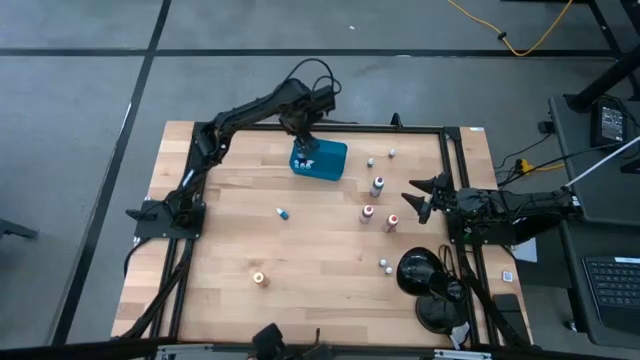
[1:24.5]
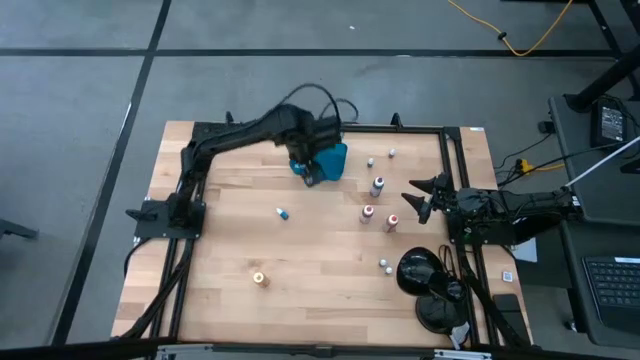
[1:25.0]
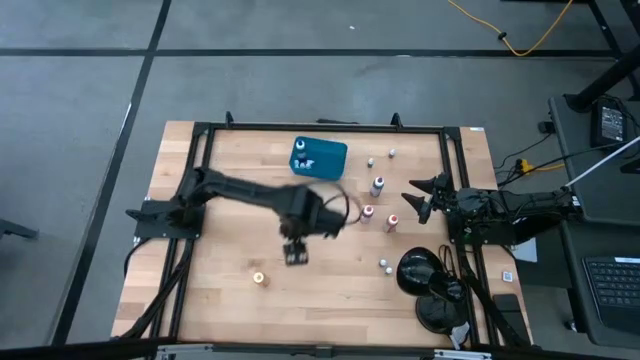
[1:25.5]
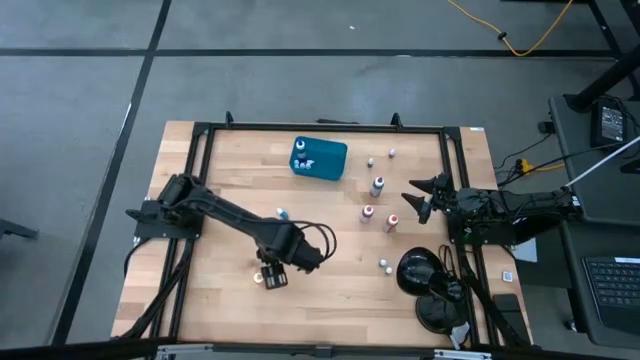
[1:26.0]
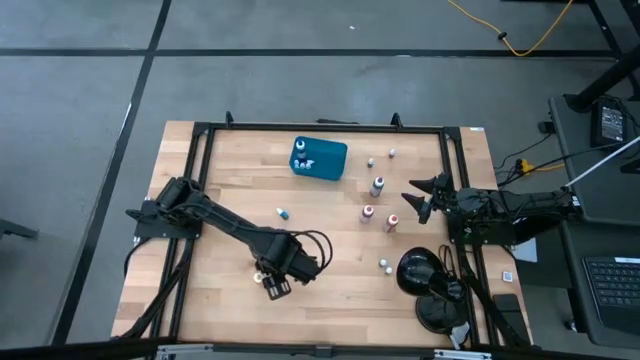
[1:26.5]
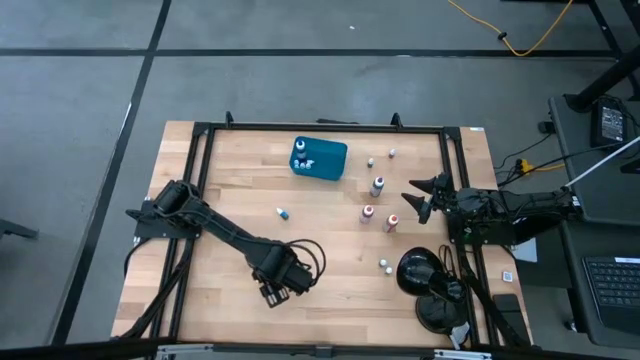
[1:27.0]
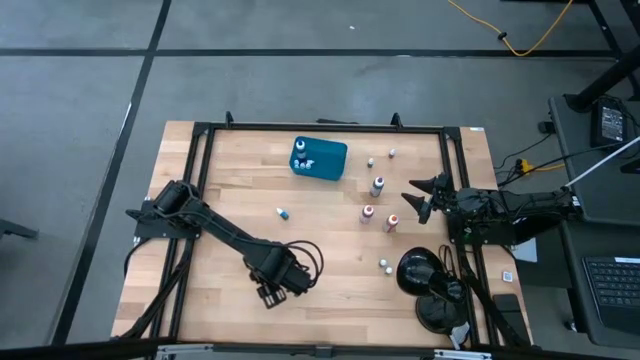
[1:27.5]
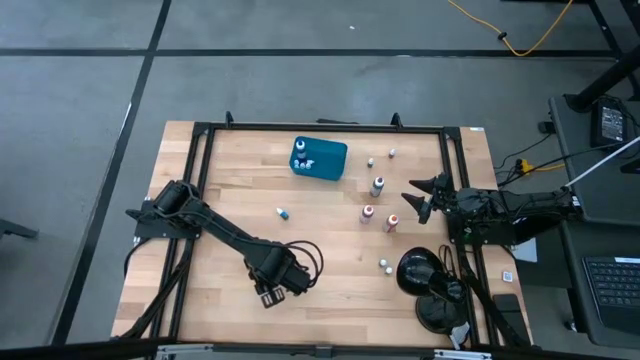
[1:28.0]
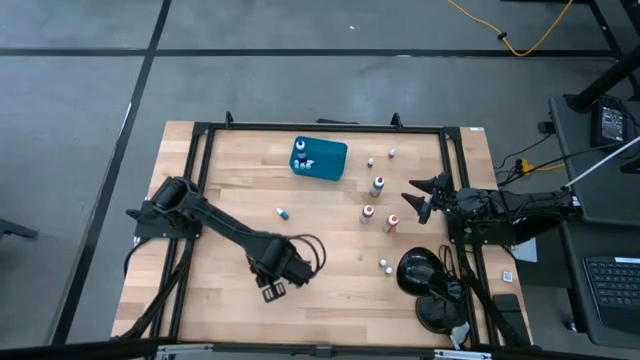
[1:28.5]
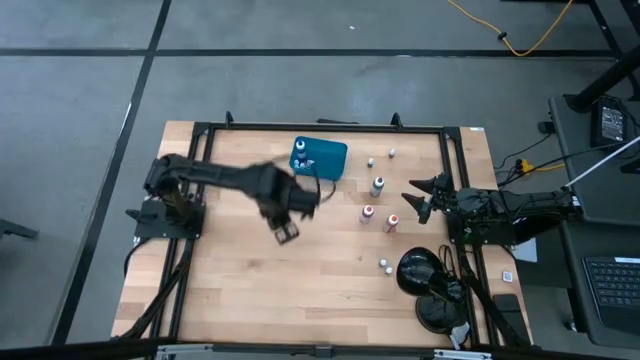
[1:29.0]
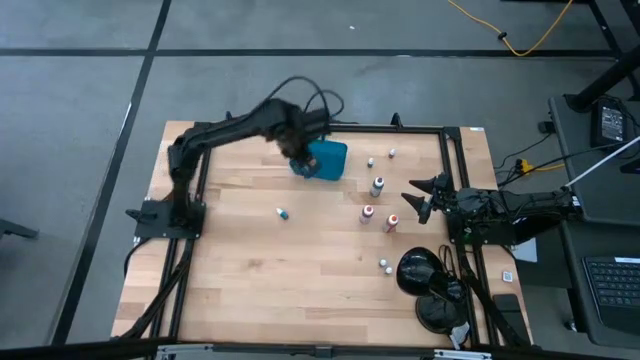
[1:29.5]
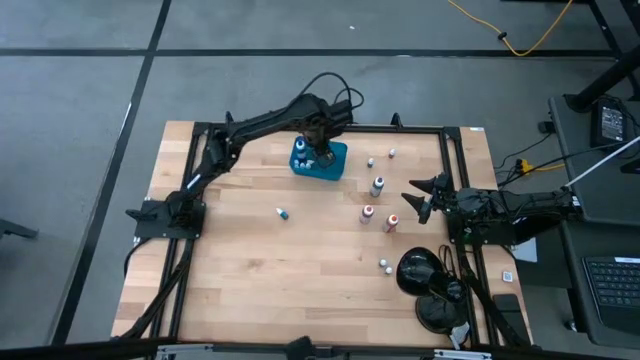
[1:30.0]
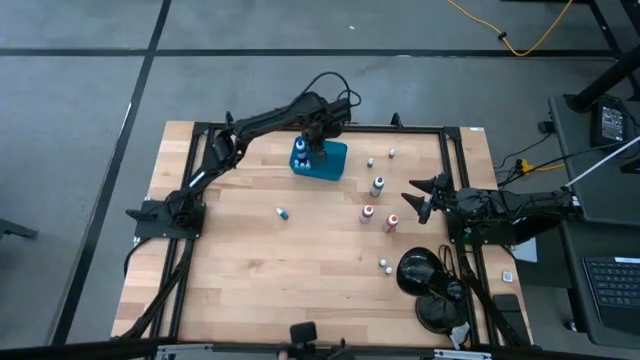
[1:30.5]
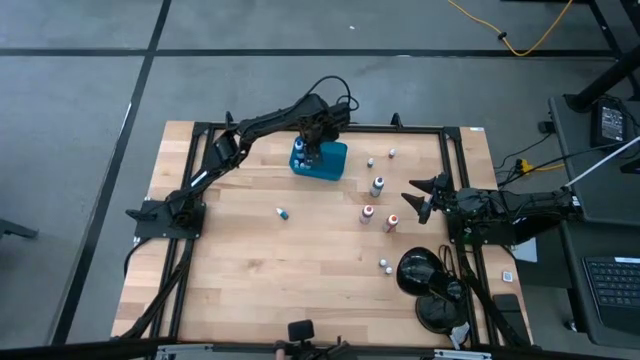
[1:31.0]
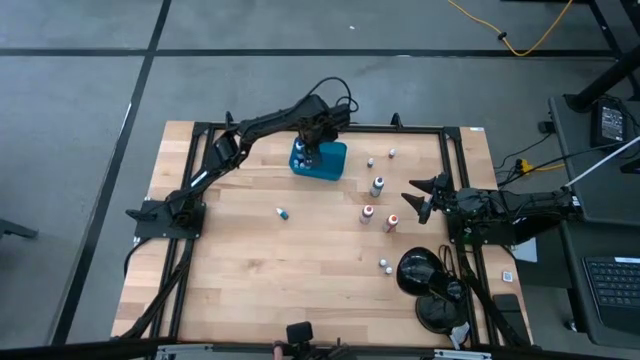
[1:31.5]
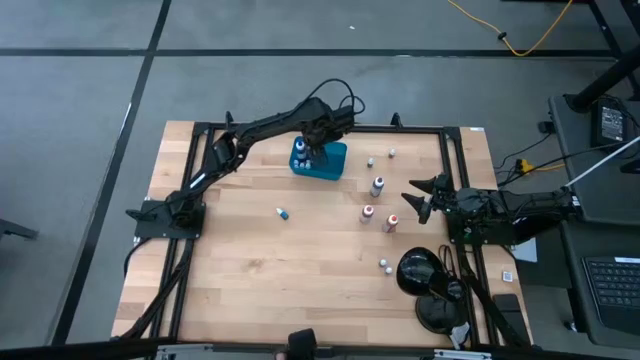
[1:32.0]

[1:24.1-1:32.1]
Task: Pick & Place food coloring
Put the large yellow food coloring bottle into the blue bin

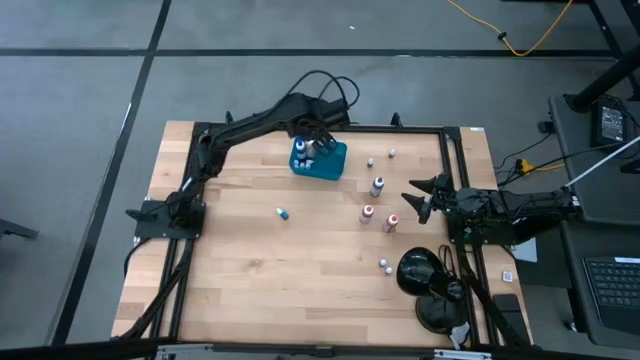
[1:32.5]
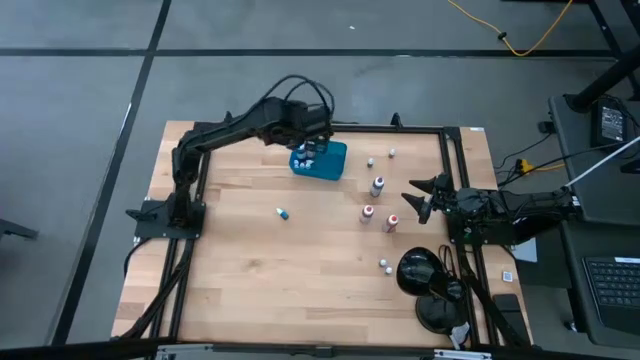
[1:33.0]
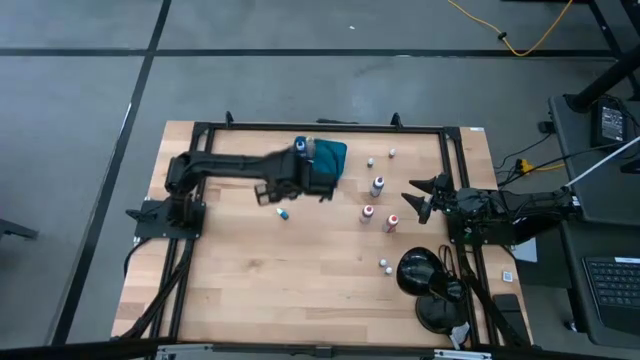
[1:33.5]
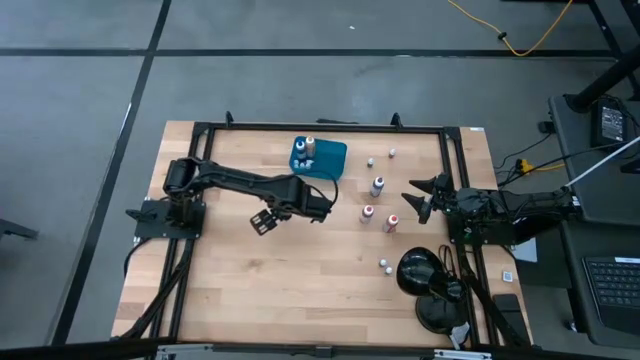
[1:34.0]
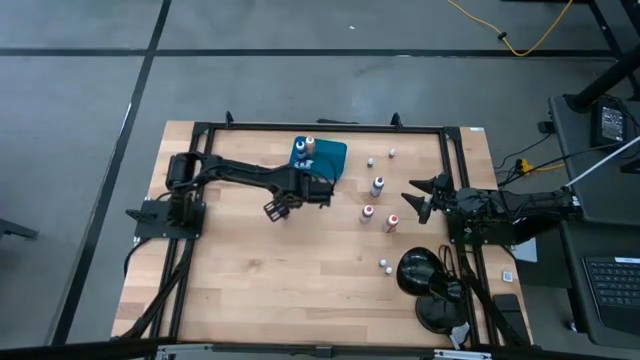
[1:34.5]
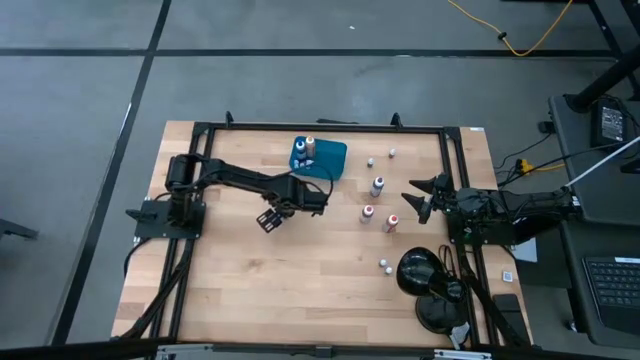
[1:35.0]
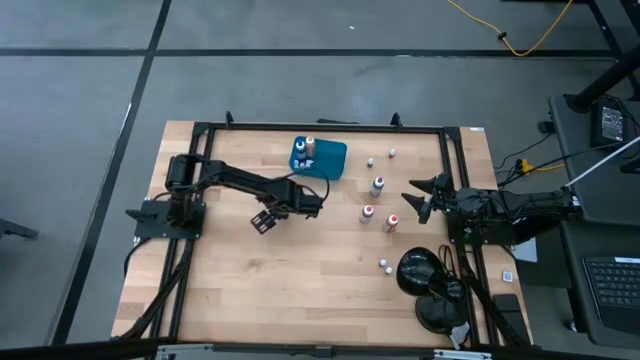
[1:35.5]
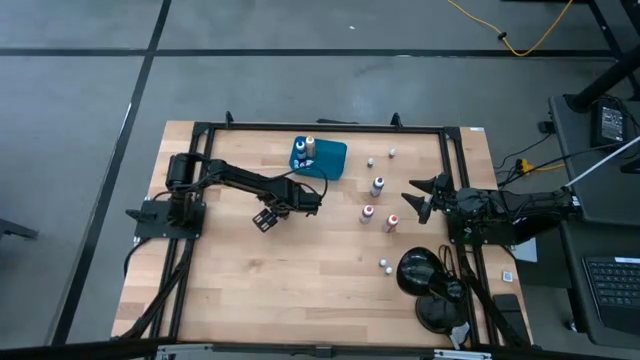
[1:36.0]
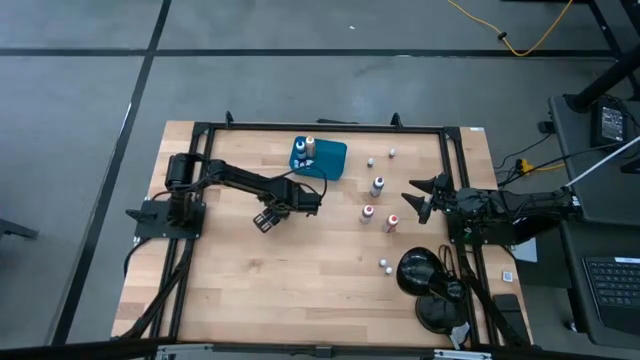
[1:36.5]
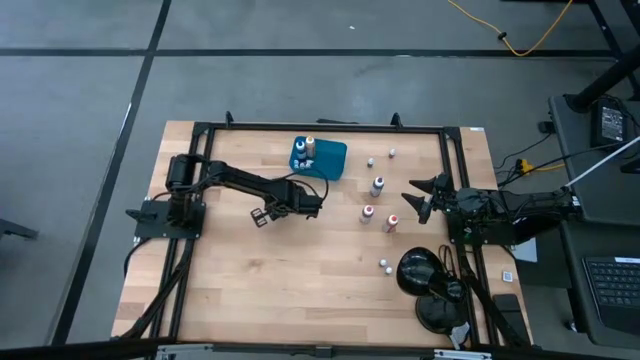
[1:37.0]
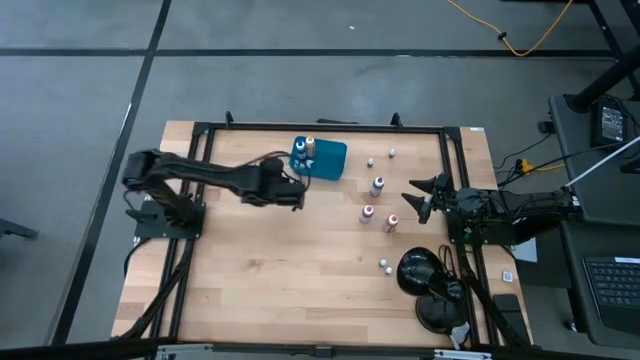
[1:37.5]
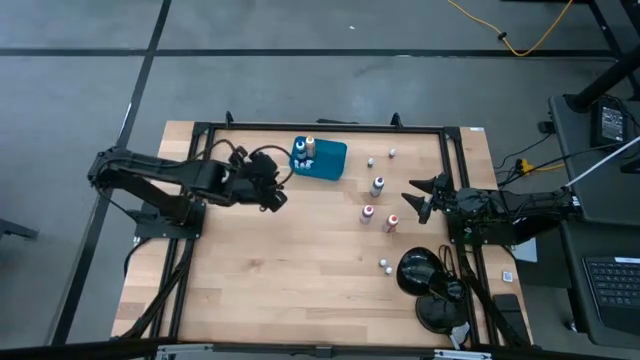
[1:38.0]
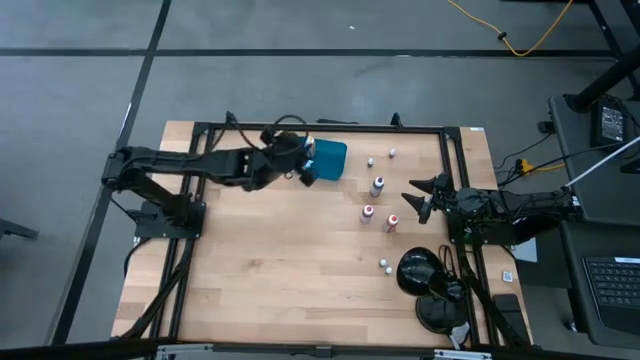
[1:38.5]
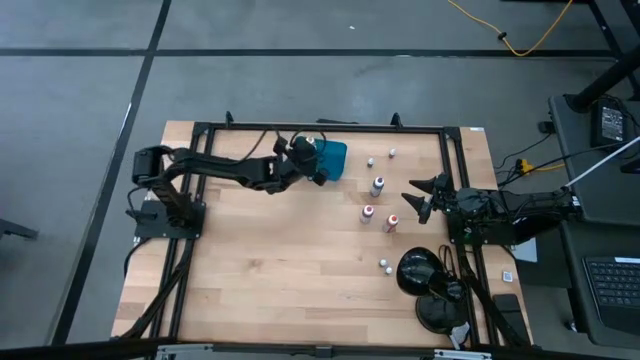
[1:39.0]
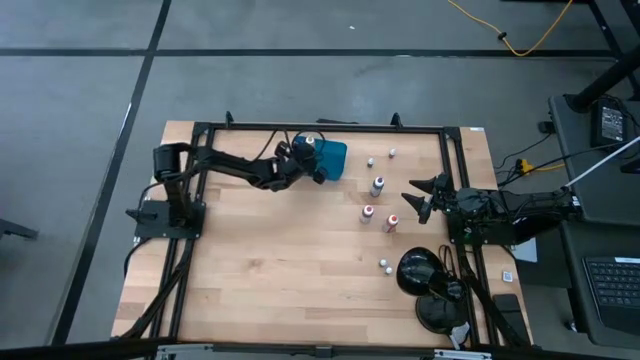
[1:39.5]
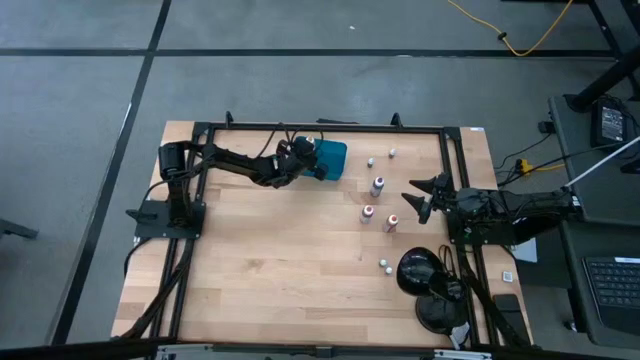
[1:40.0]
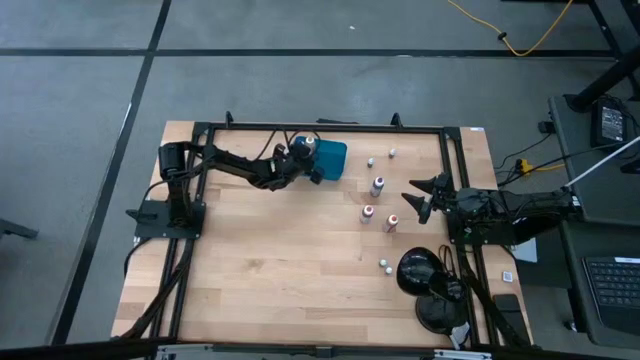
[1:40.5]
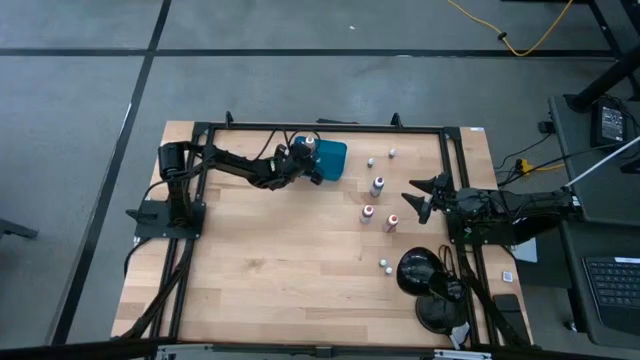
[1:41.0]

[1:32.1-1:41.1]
Put the small blue food coloring bottle into the blue bin

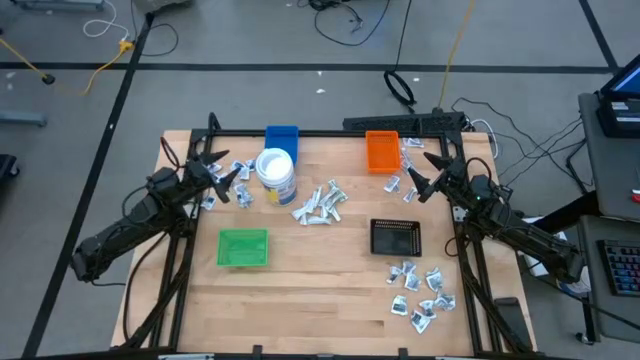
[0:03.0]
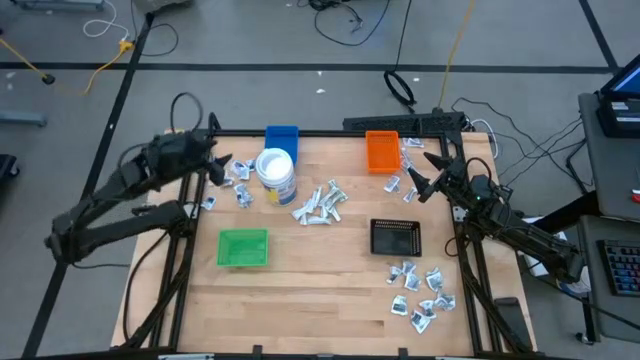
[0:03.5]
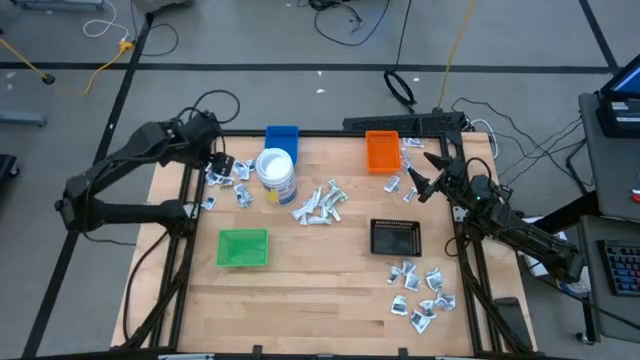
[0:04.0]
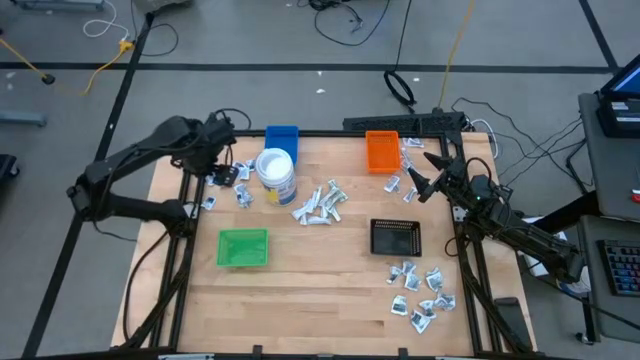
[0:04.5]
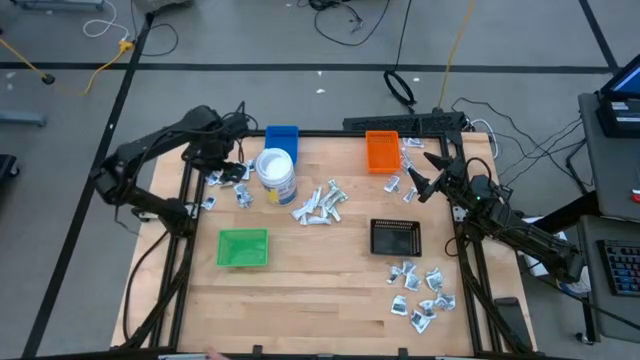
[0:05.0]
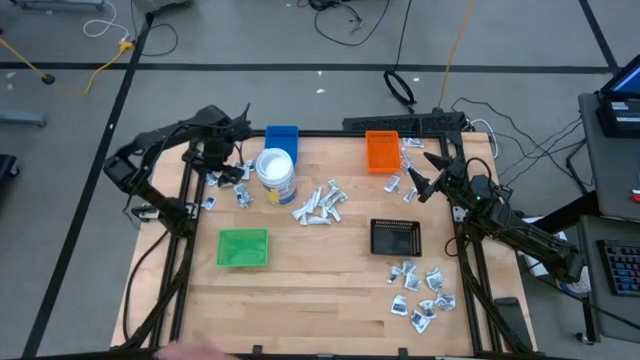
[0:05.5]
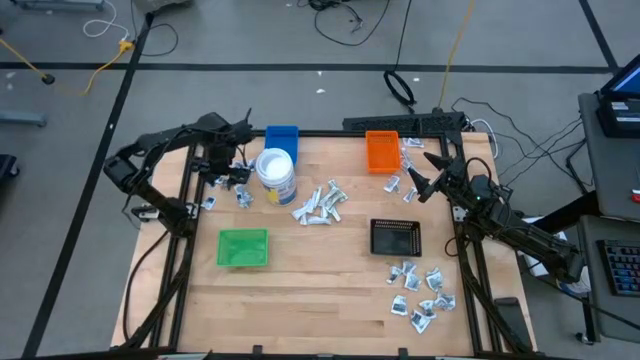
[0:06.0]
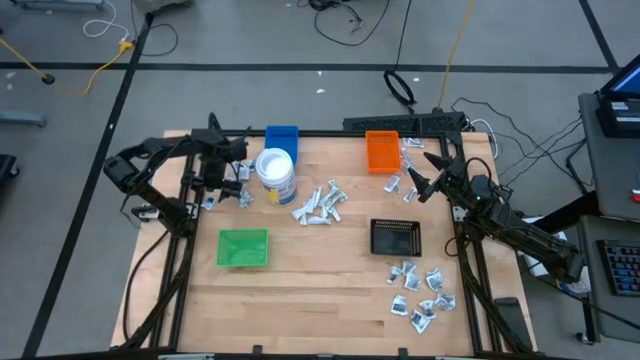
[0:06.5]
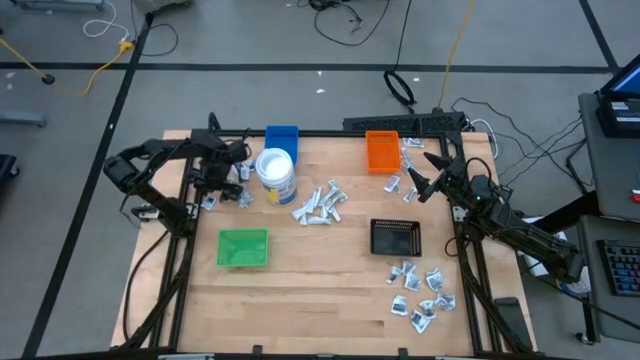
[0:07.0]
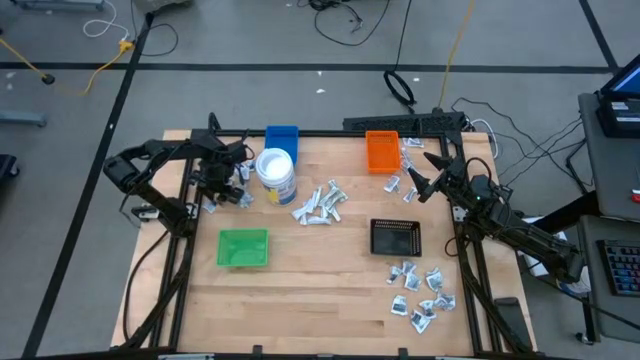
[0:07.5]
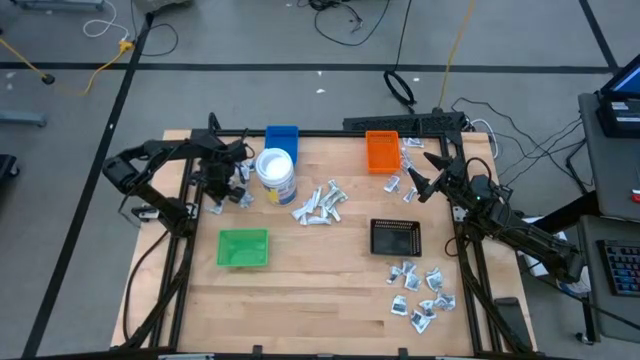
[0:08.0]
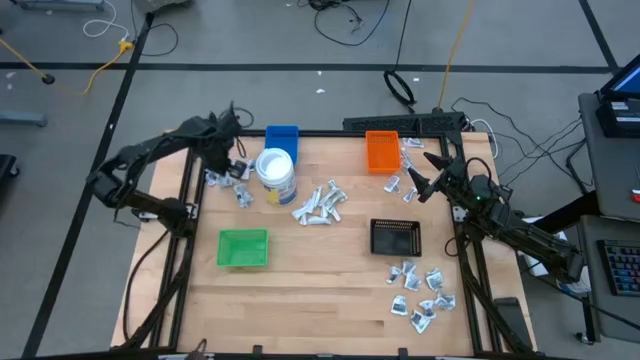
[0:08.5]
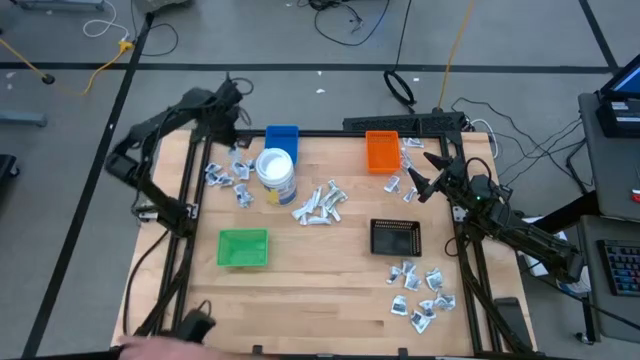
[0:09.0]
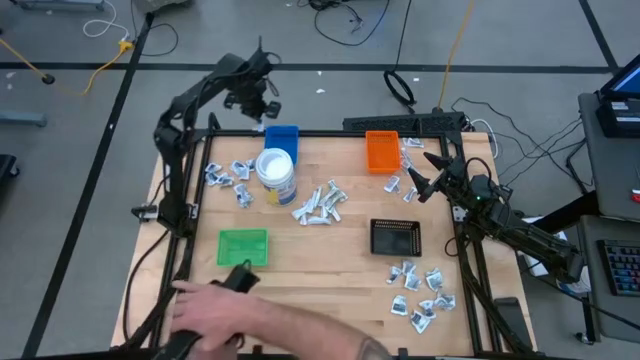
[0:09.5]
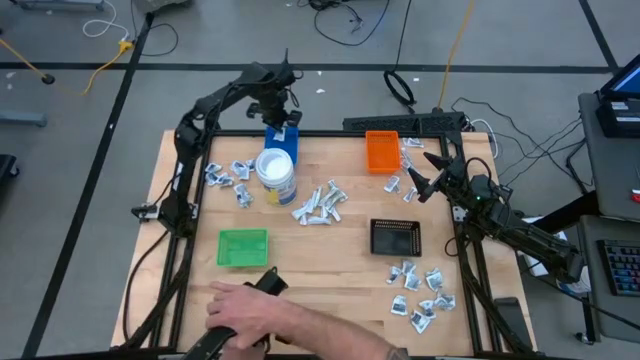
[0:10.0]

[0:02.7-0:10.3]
Task: Pick & Place First Aid Supplies
Put the blue alcohol pad into the blue bin
